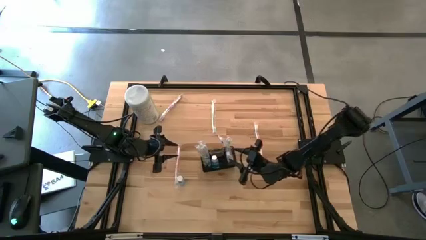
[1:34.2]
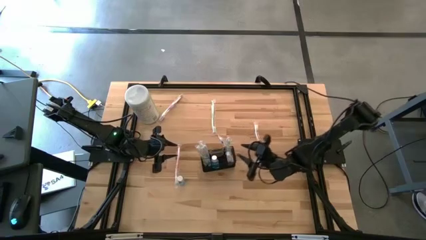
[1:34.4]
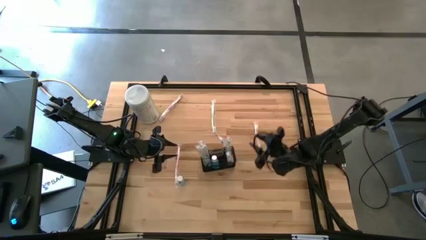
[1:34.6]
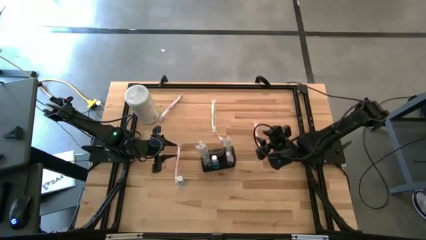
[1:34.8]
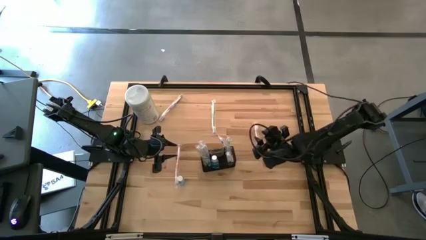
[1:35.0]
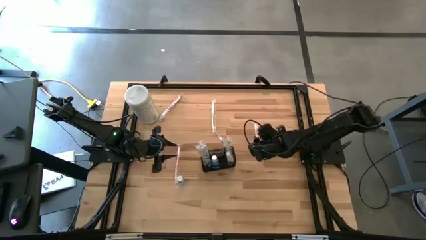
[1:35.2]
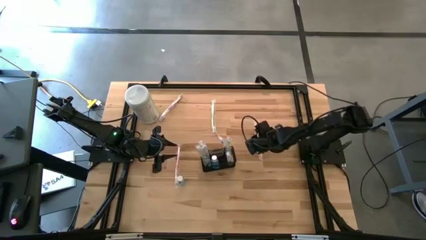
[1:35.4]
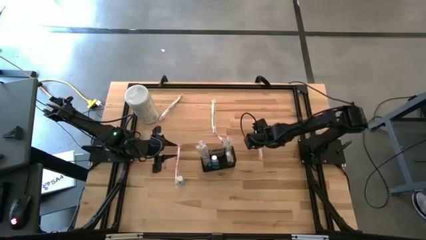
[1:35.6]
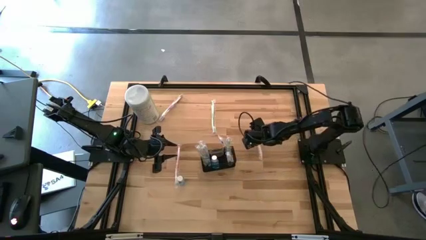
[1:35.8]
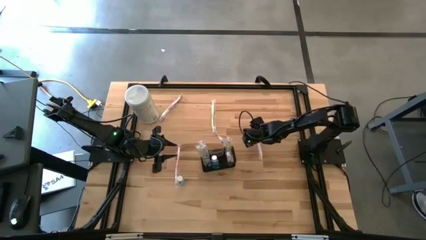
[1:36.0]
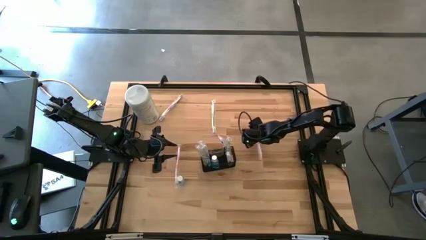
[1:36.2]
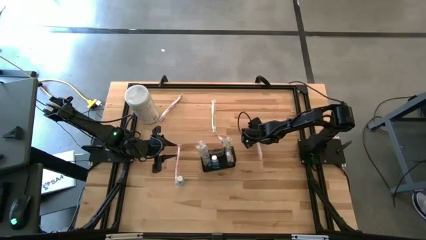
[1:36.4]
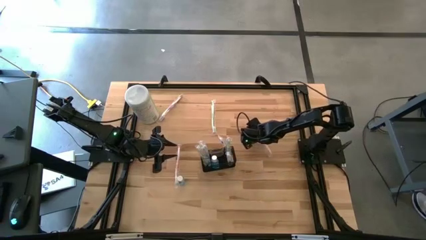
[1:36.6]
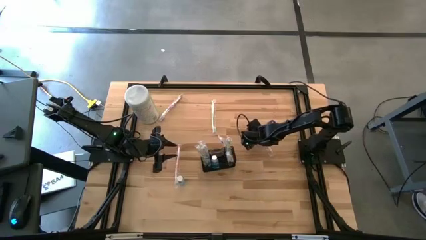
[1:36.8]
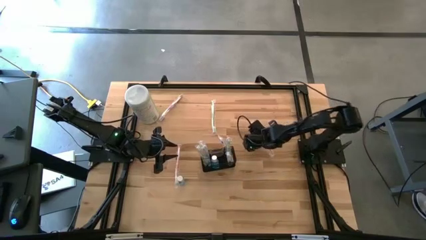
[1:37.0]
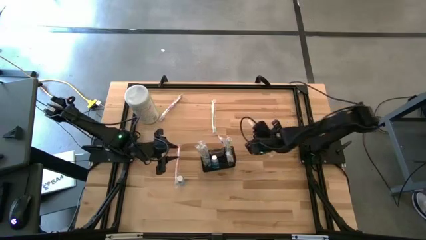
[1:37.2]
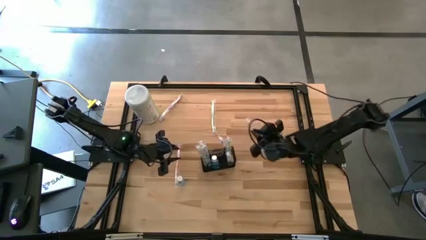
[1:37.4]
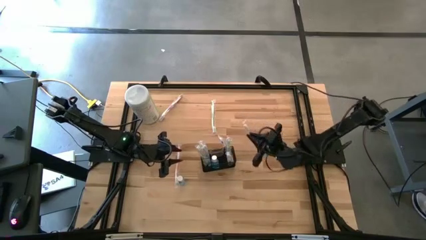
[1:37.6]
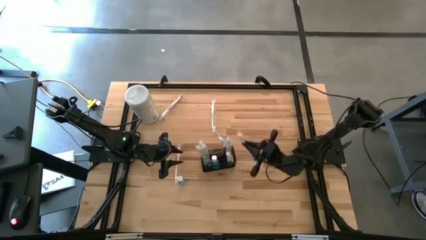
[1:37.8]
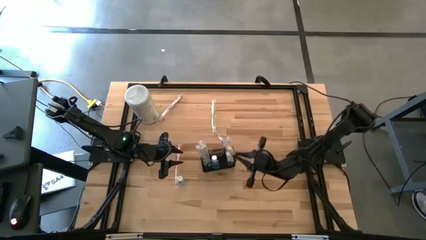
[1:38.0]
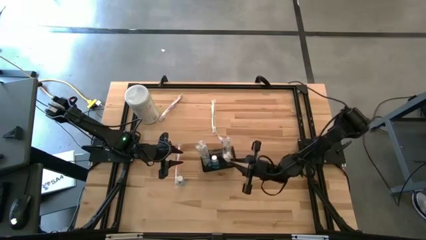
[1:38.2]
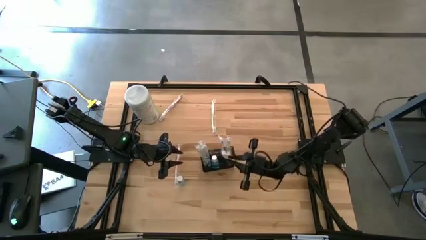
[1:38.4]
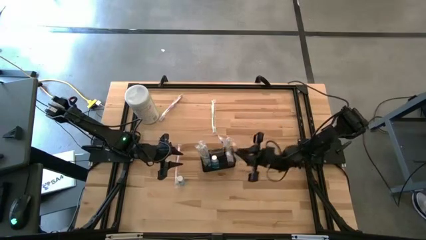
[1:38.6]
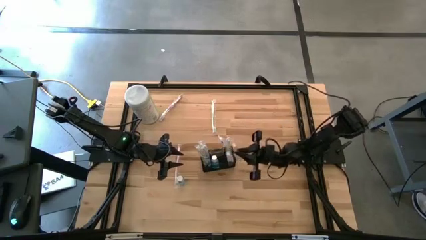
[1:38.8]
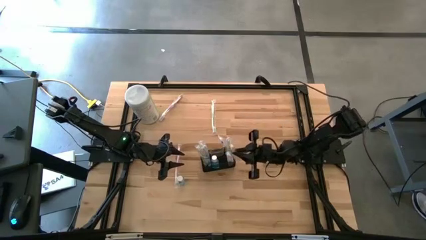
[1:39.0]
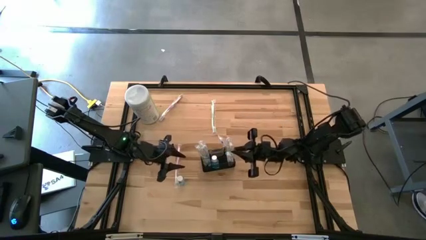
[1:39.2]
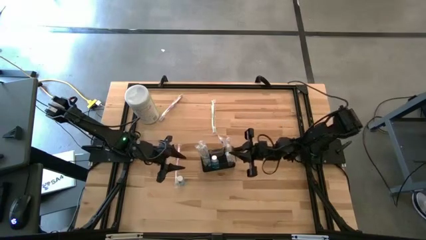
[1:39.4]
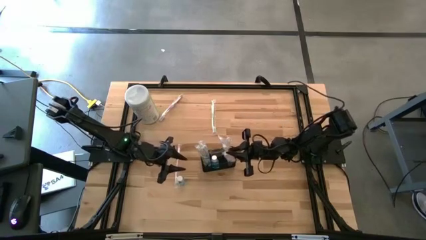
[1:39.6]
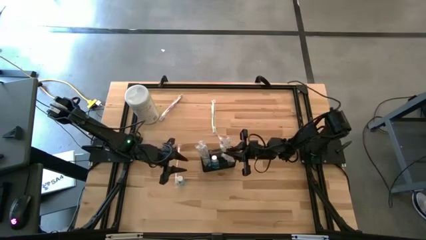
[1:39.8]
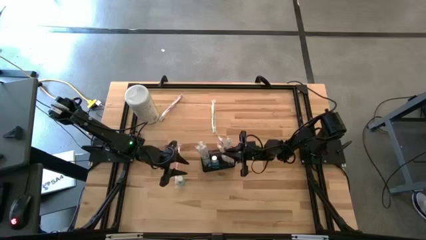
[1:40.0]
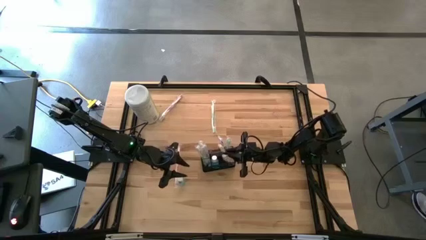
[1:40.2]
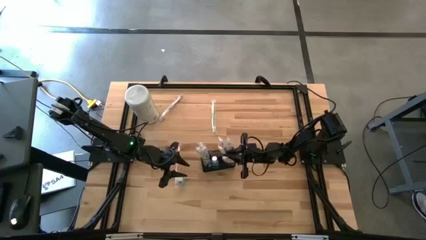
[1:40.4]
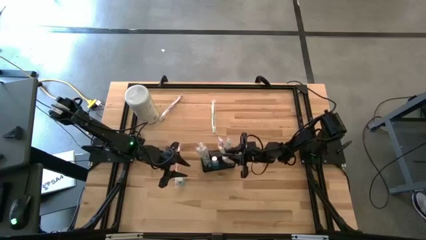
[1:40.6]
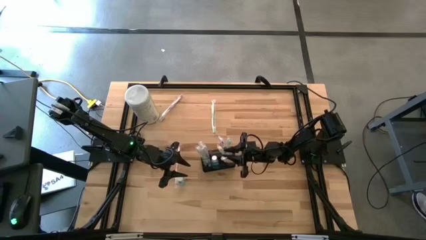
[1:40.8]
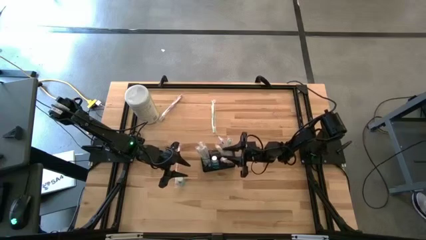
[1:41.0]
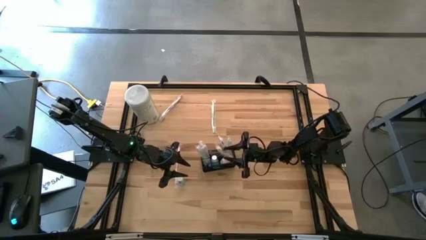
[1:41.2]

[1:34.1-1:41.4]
Task: Pick & Place toothbrushing station
Put the orange toothbrush into the black wire organizer

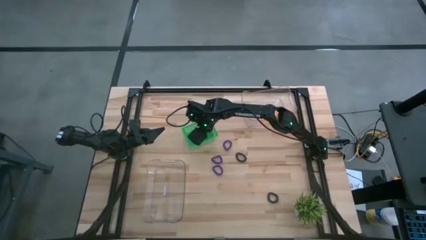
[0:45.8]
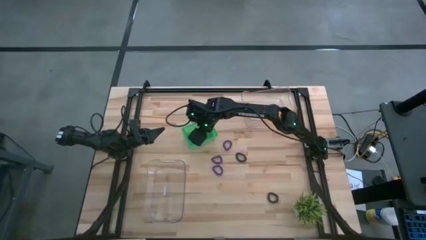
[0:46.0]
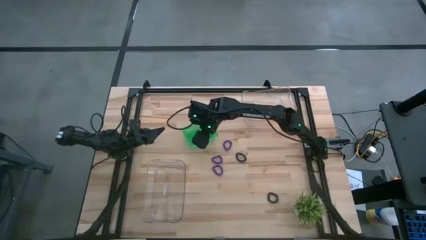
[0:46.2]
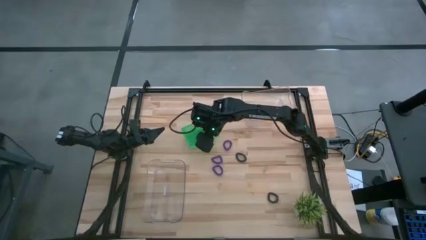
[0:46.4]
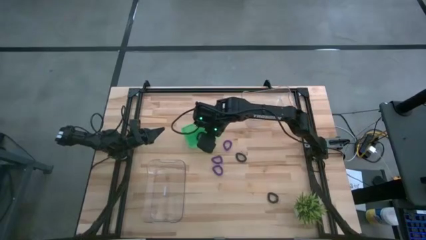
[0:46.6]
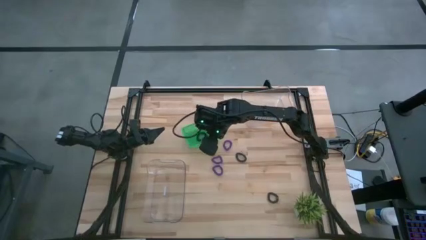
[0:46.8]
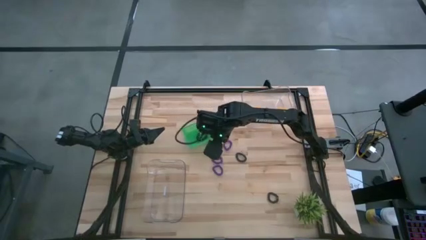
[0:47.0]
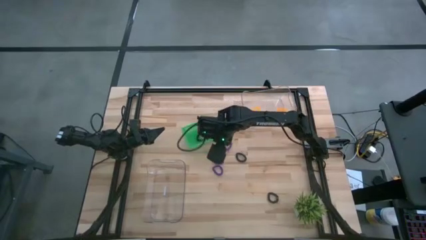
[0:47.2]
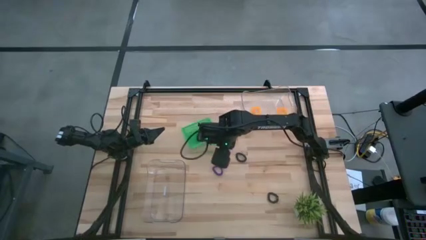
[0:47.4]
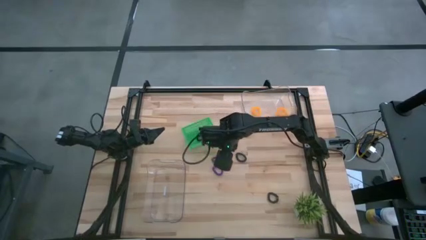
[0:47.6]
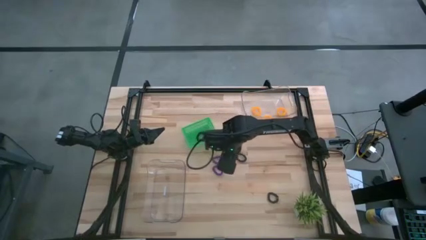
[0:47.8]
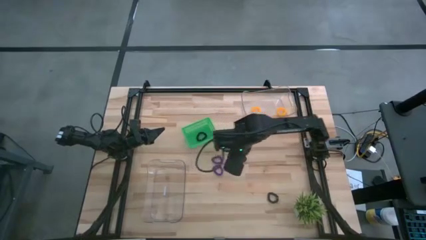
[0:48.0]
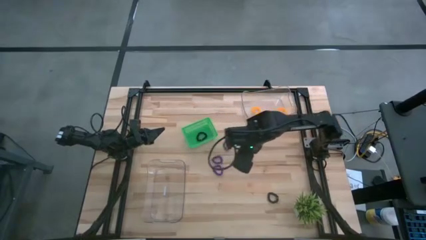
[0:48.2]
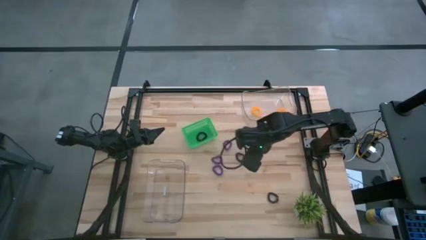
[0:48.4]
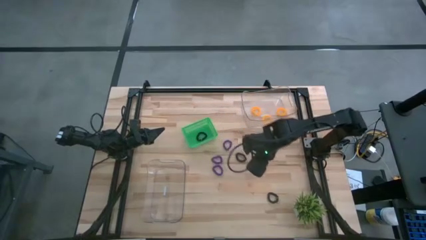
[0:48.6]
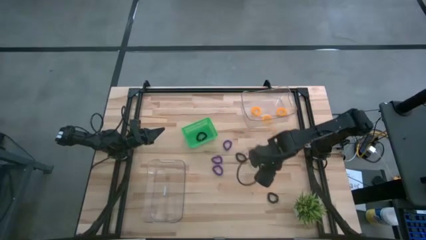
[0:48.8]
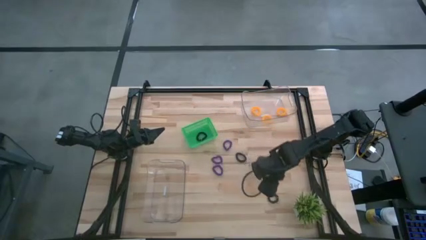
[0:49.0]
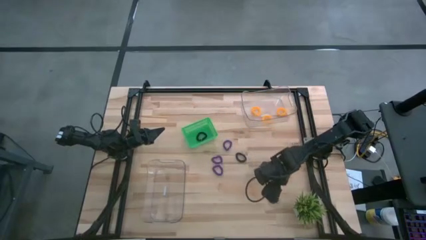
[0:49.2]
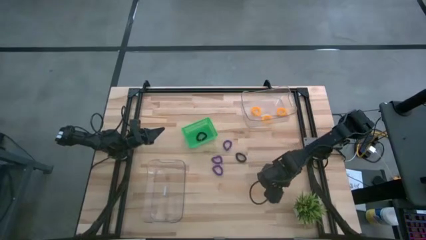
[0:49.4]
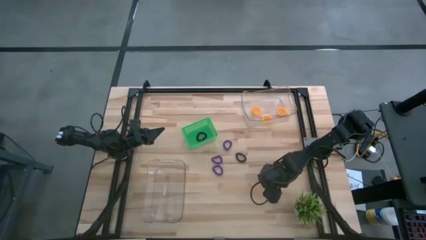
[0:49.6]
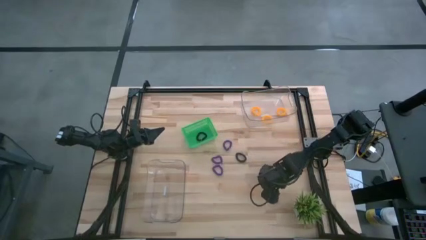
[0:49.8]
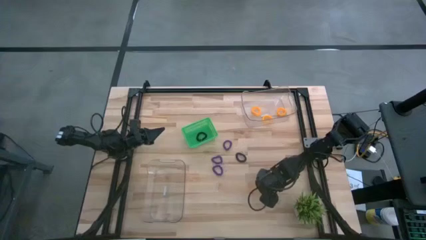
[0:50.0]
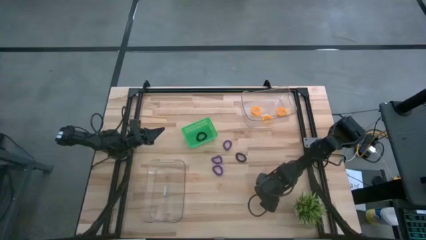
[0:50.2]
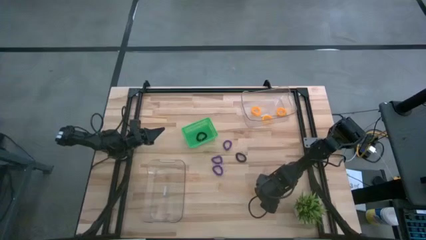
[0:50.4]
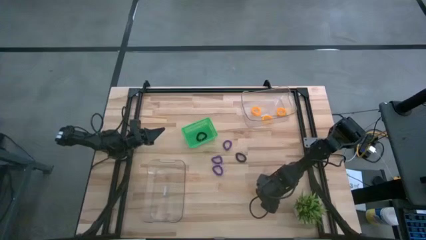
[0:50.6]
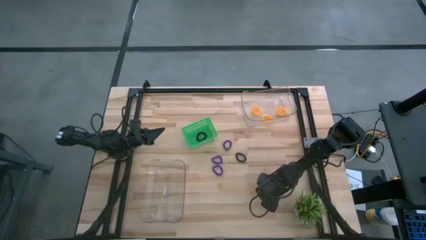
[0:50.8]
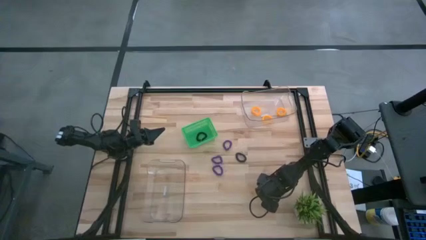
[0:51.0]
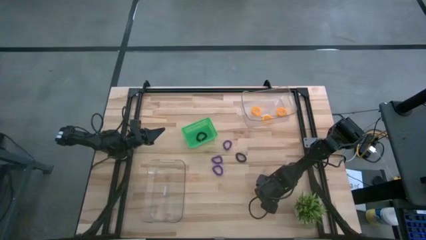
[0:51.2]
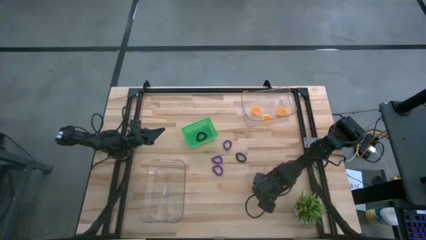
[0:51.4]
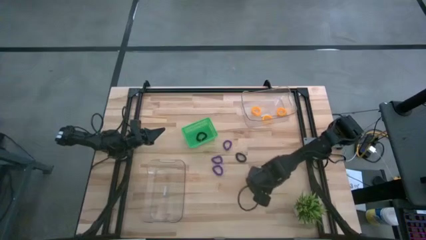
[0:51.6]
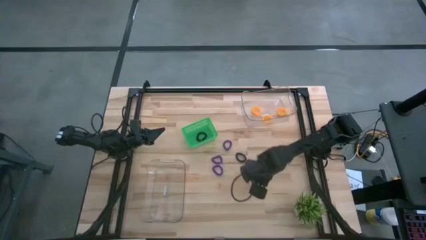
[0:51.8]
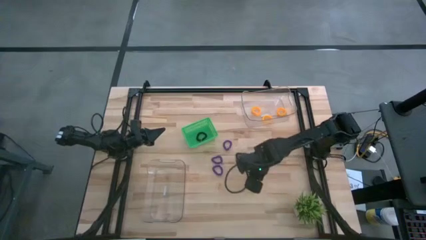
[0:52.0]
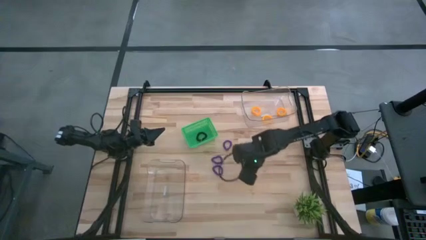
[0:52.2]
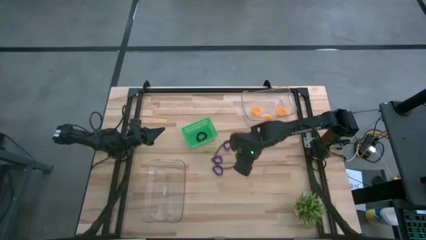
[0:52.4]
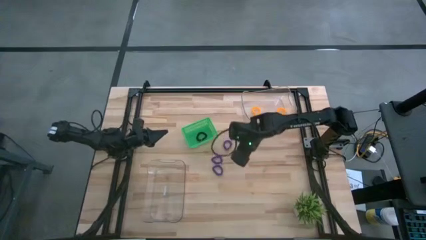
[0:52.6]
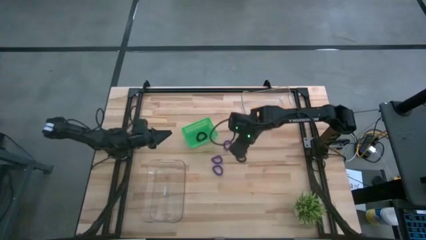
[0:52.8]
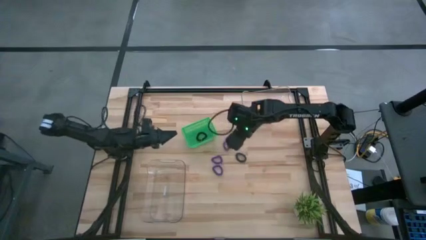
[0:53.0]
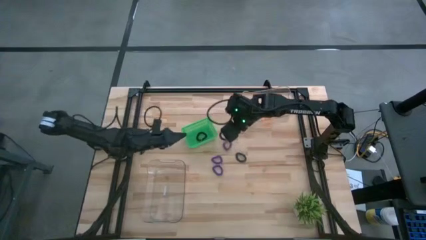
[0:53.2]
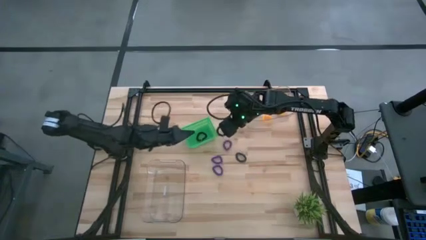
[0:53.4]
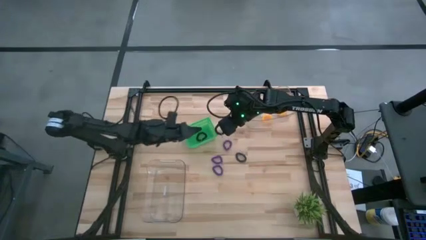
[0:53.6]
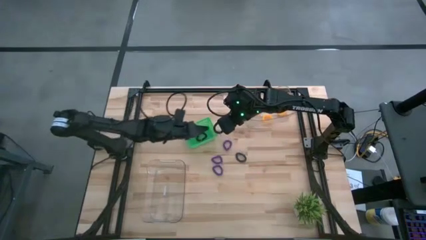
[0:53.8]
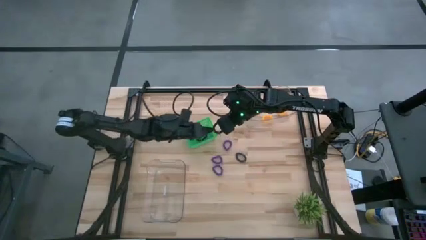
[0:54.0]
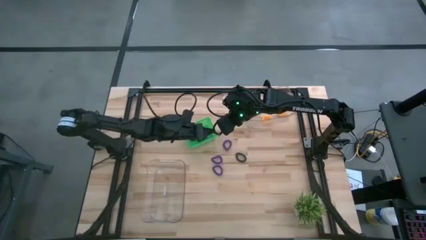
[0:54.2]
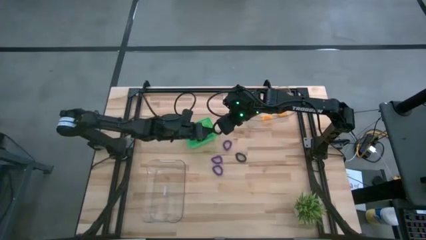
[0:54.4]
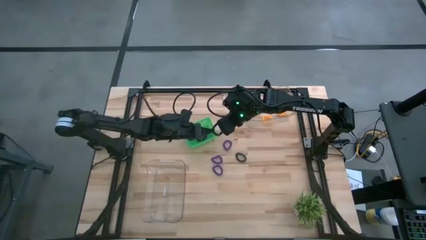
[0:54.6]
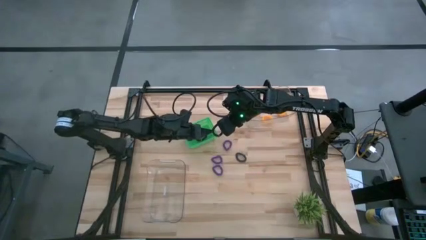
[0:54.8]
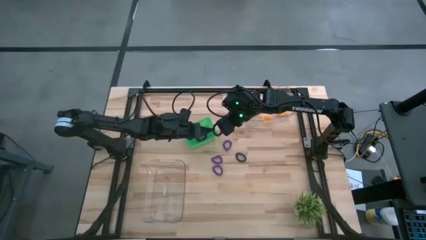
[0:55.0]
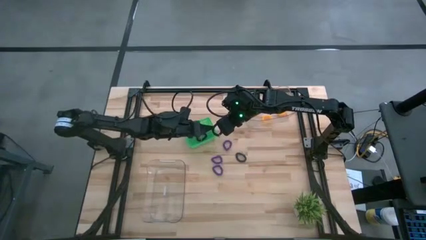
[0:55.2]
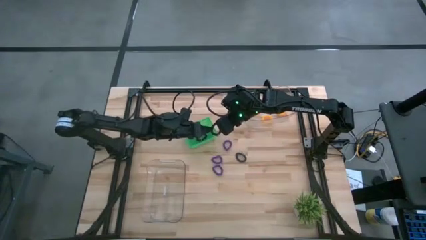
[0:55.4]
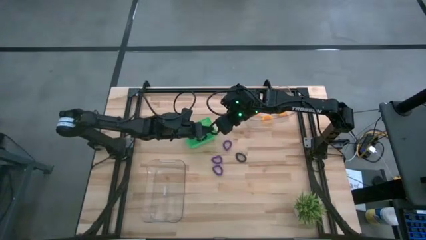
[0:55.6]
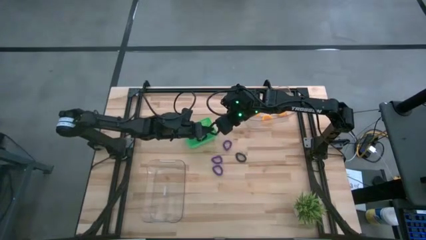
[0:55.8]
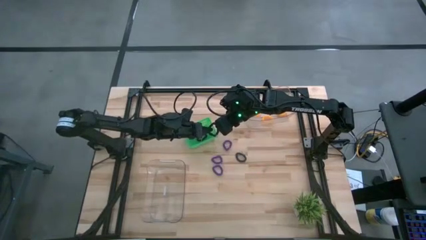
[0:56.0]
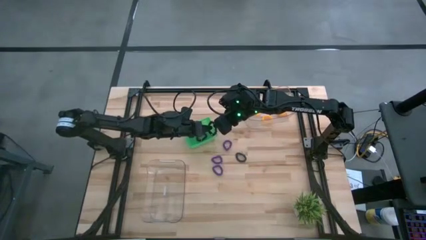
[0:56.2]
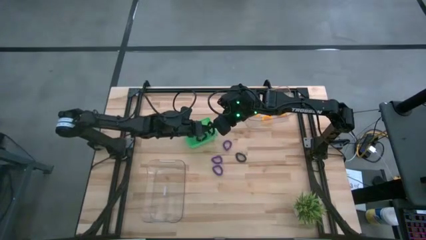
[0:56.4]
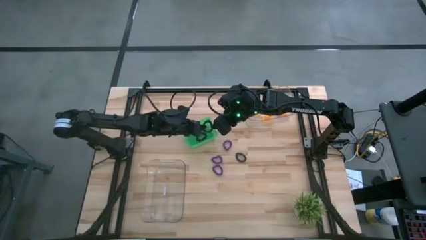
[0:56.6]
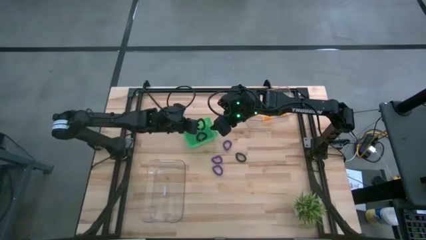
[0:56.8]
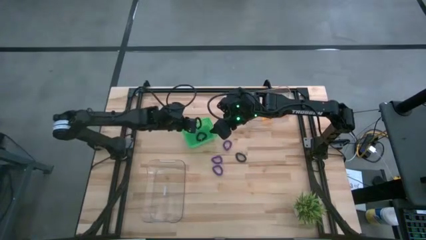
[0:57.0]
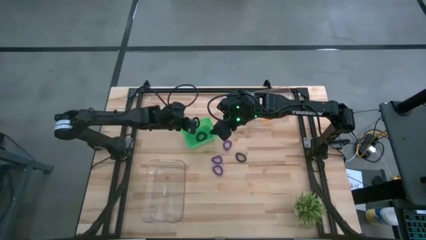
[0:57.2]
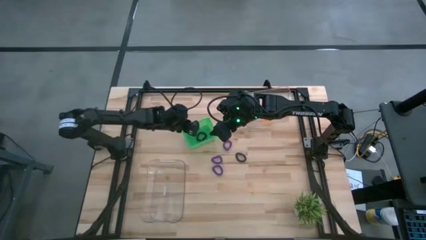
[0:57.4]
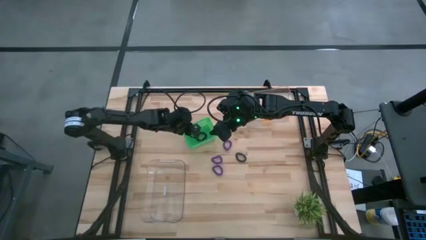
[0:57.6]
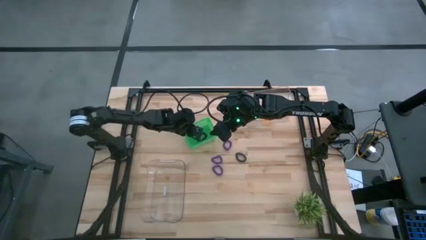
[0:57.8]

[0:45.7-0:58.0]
Task: Sort spring keychains
Put the bottom black spring keychain into the green bin
